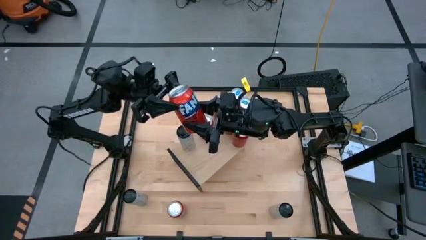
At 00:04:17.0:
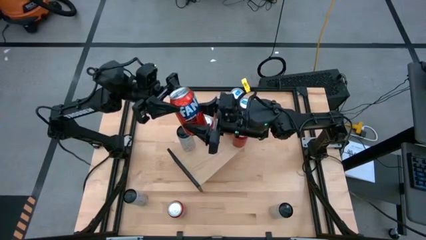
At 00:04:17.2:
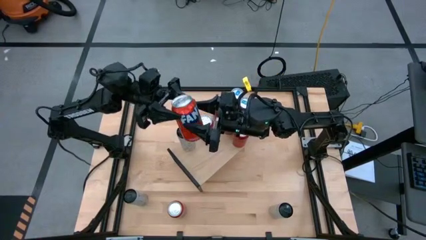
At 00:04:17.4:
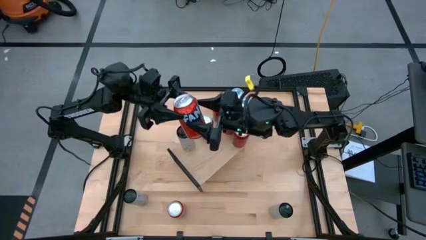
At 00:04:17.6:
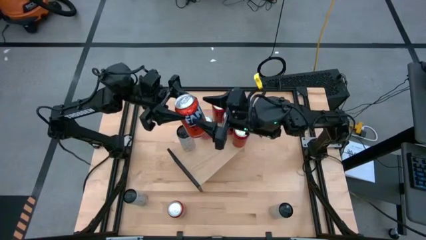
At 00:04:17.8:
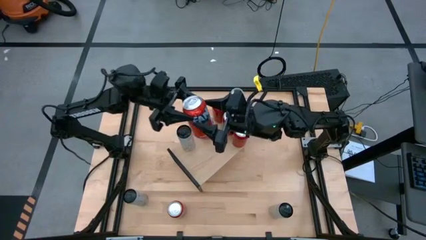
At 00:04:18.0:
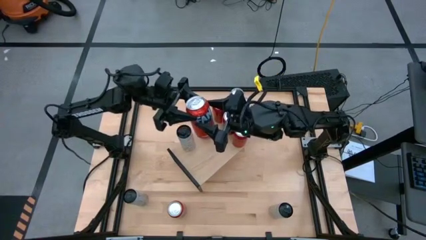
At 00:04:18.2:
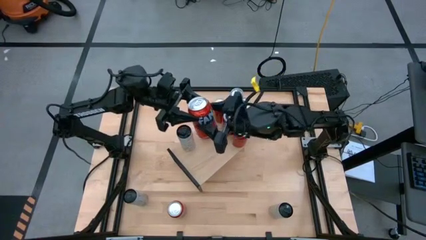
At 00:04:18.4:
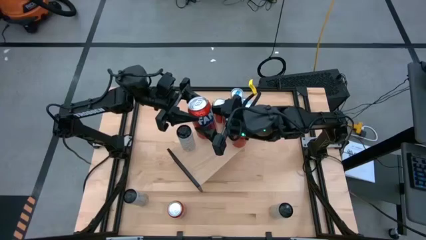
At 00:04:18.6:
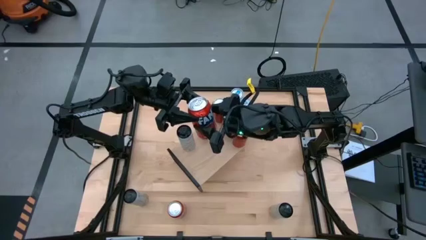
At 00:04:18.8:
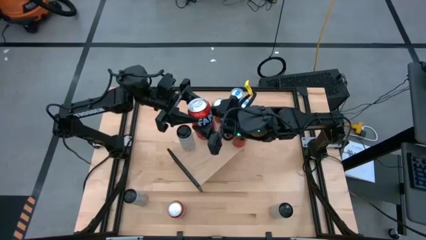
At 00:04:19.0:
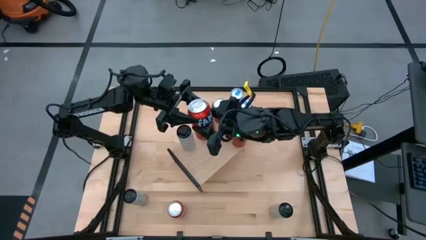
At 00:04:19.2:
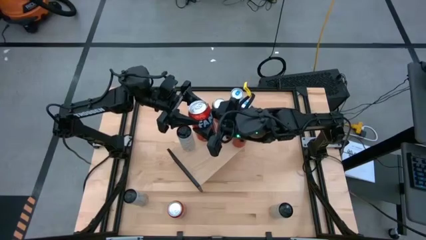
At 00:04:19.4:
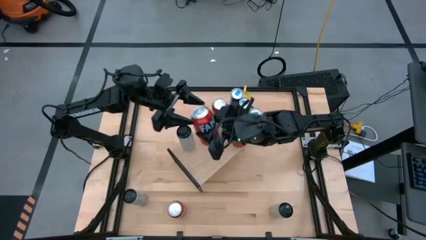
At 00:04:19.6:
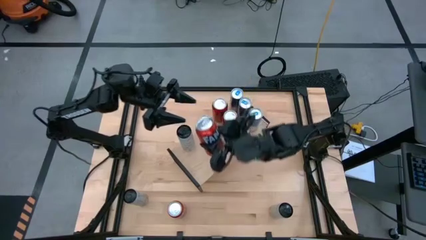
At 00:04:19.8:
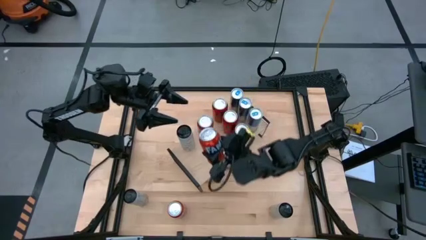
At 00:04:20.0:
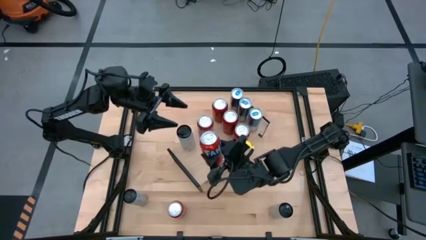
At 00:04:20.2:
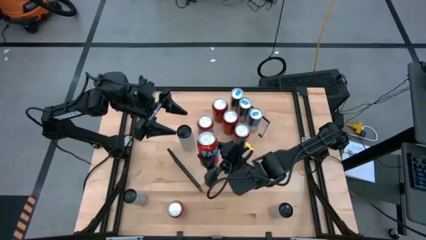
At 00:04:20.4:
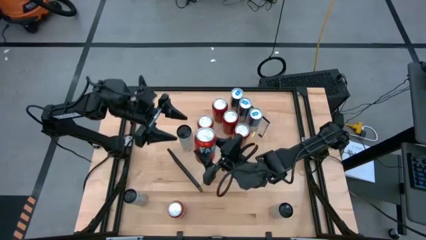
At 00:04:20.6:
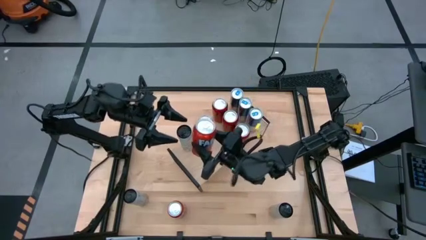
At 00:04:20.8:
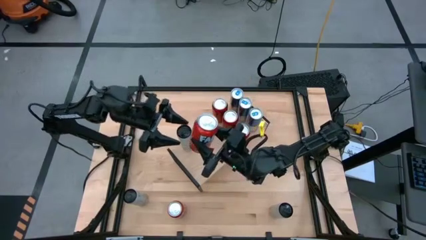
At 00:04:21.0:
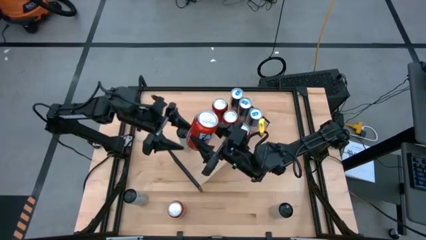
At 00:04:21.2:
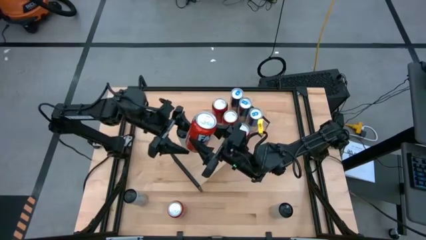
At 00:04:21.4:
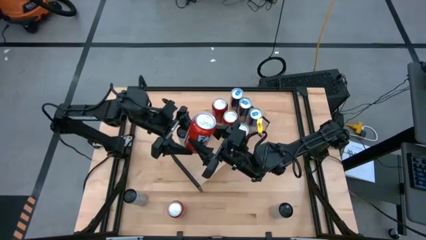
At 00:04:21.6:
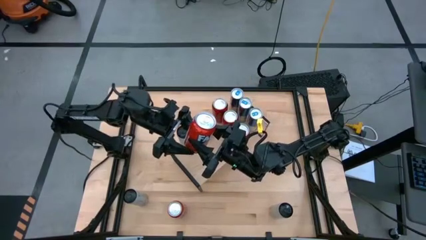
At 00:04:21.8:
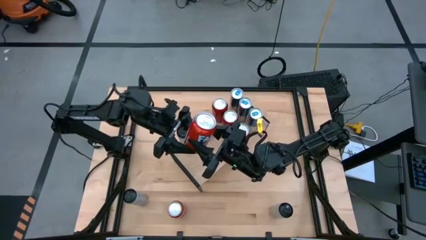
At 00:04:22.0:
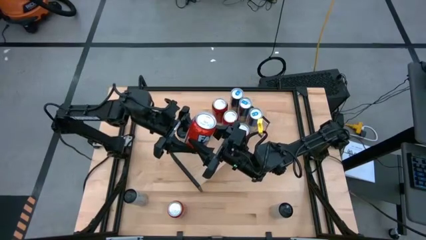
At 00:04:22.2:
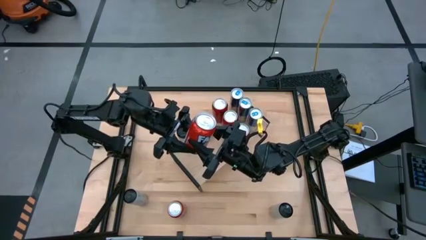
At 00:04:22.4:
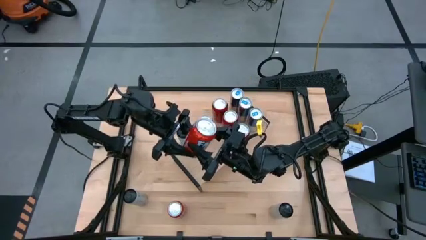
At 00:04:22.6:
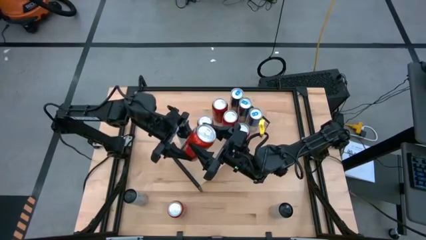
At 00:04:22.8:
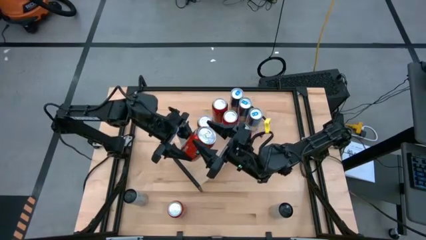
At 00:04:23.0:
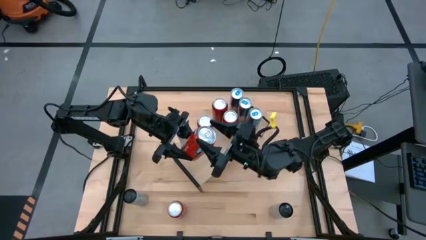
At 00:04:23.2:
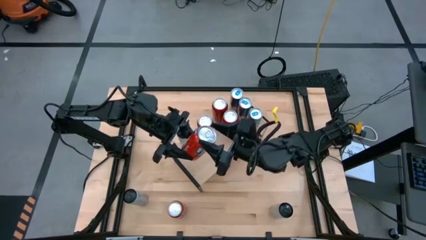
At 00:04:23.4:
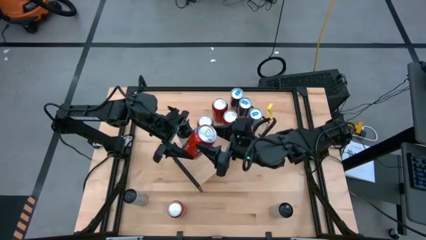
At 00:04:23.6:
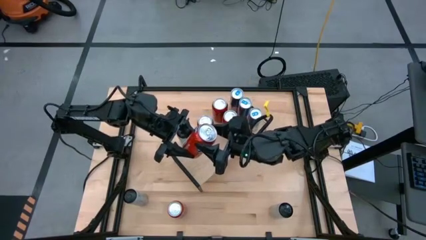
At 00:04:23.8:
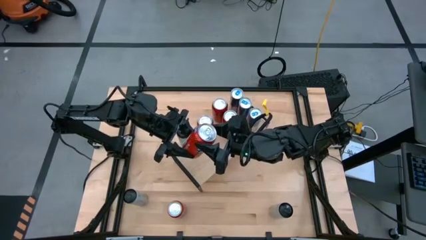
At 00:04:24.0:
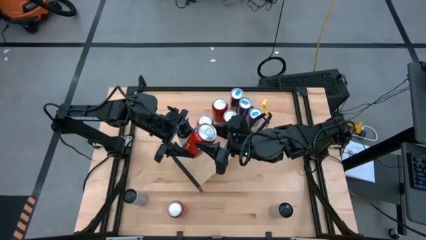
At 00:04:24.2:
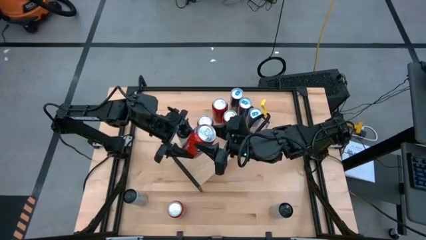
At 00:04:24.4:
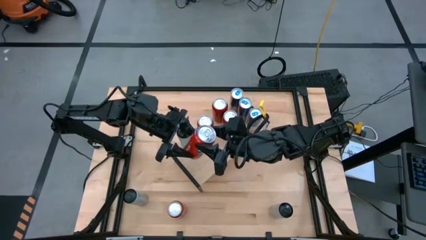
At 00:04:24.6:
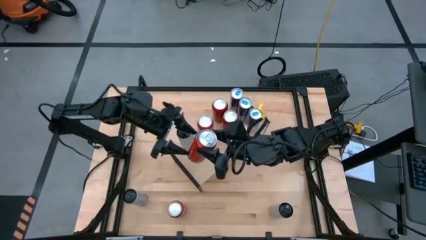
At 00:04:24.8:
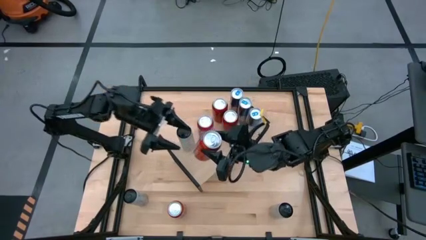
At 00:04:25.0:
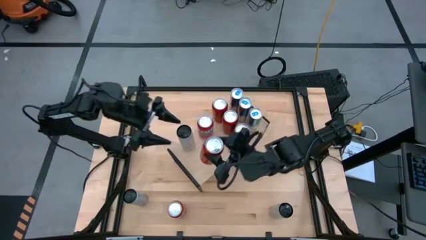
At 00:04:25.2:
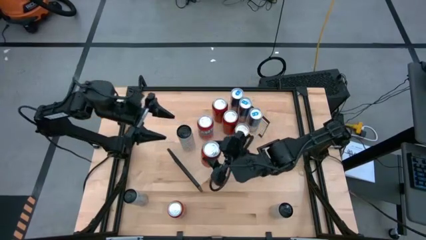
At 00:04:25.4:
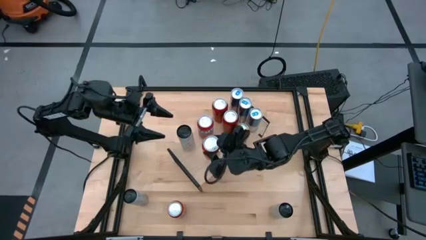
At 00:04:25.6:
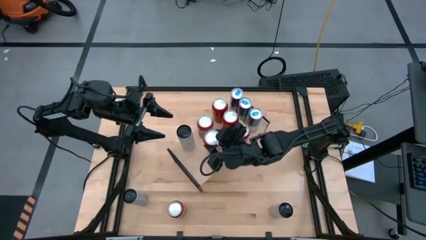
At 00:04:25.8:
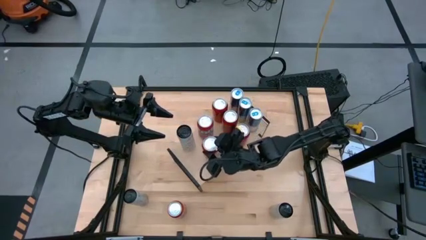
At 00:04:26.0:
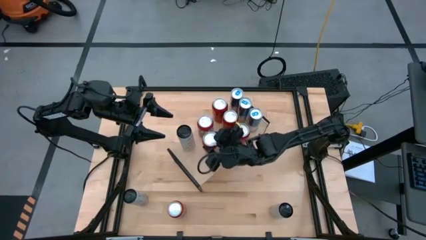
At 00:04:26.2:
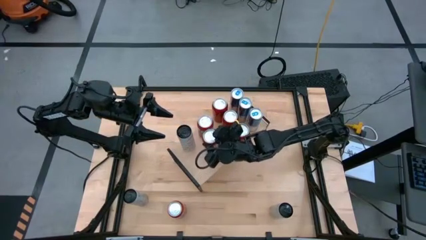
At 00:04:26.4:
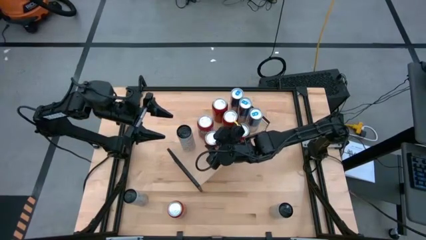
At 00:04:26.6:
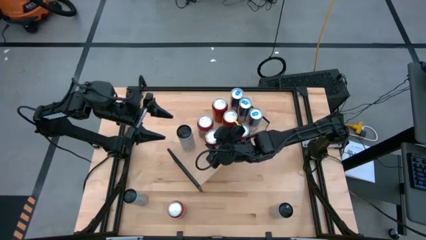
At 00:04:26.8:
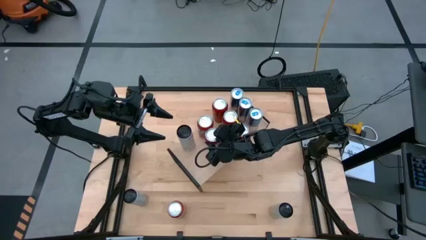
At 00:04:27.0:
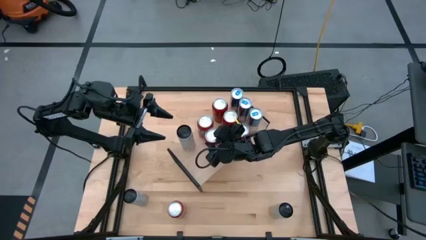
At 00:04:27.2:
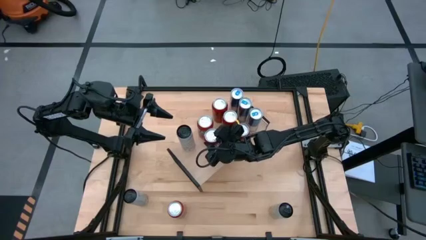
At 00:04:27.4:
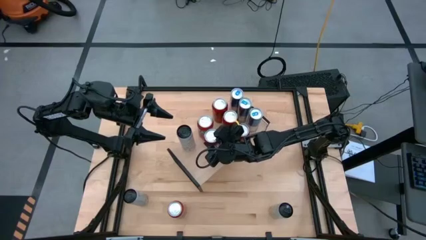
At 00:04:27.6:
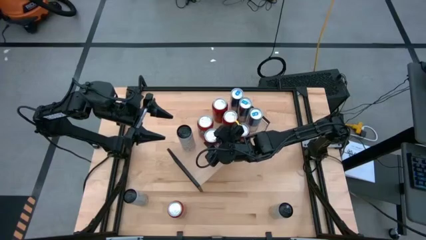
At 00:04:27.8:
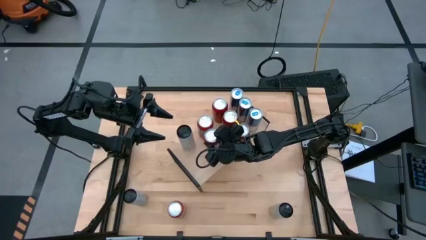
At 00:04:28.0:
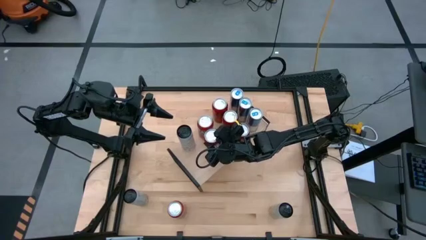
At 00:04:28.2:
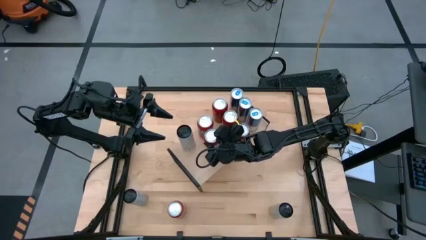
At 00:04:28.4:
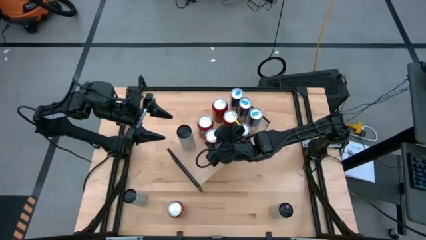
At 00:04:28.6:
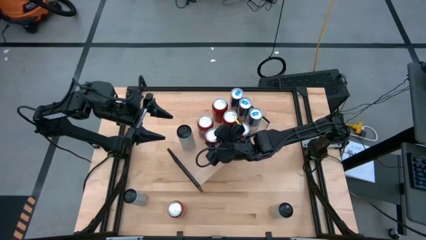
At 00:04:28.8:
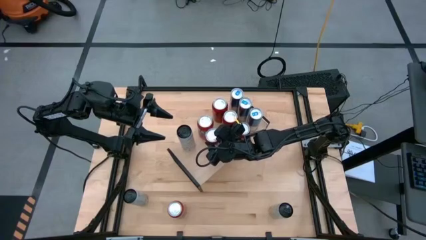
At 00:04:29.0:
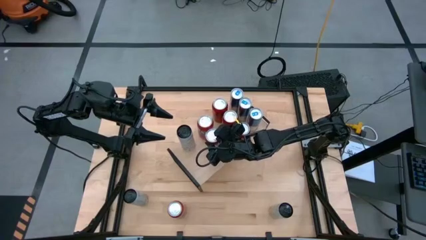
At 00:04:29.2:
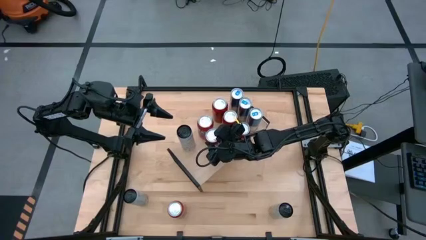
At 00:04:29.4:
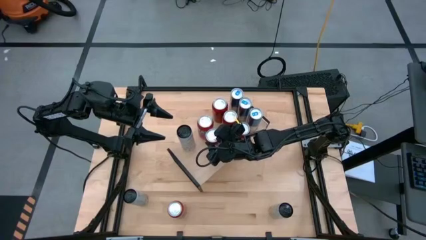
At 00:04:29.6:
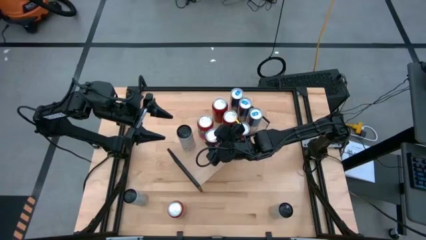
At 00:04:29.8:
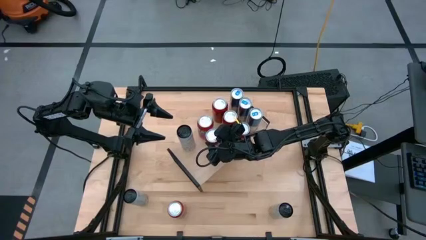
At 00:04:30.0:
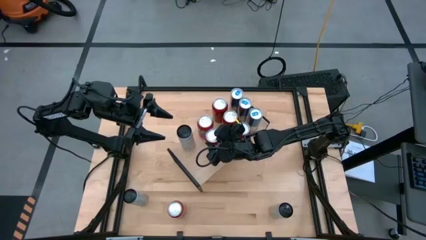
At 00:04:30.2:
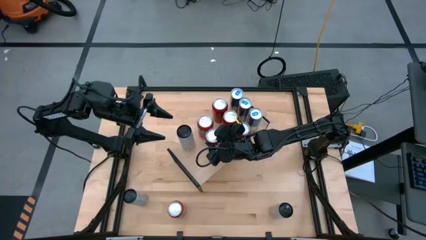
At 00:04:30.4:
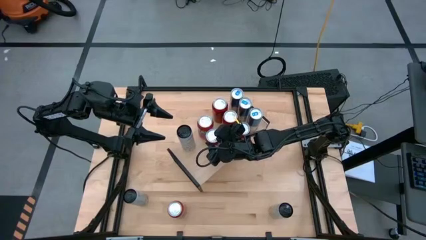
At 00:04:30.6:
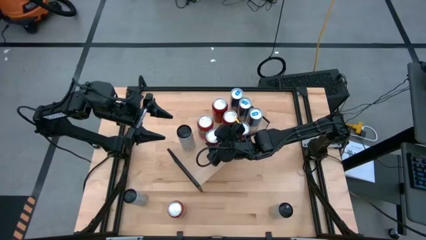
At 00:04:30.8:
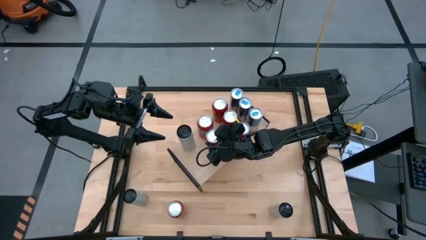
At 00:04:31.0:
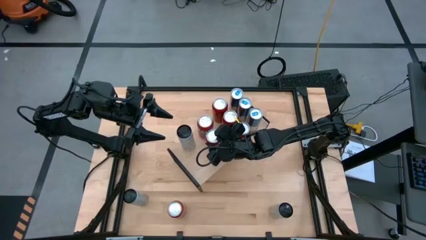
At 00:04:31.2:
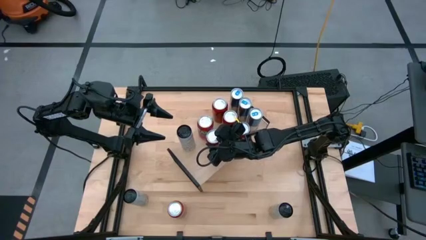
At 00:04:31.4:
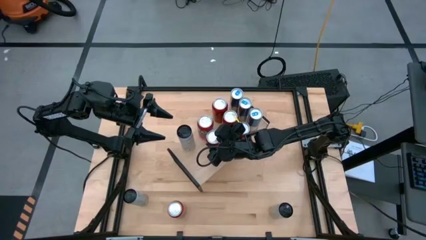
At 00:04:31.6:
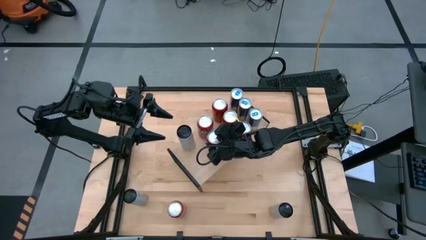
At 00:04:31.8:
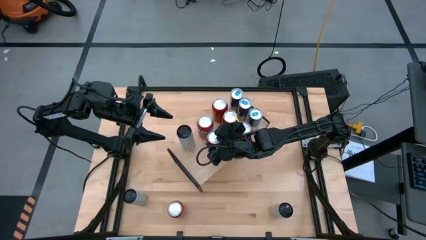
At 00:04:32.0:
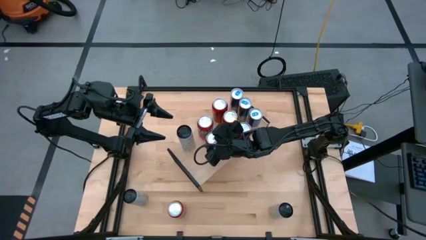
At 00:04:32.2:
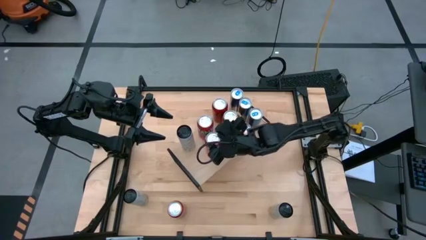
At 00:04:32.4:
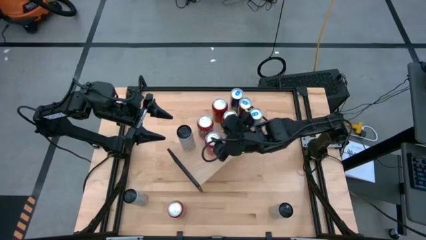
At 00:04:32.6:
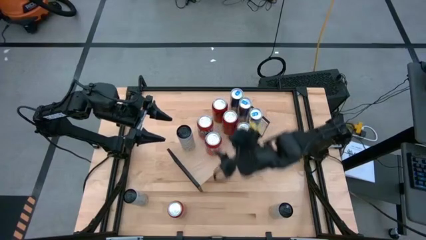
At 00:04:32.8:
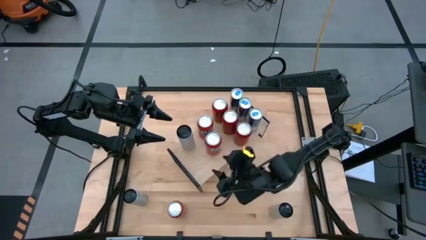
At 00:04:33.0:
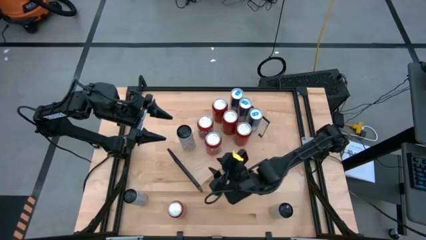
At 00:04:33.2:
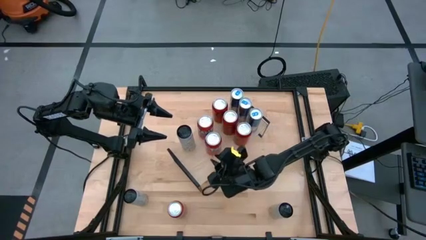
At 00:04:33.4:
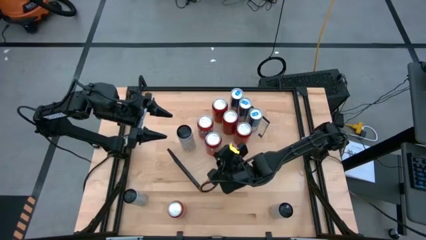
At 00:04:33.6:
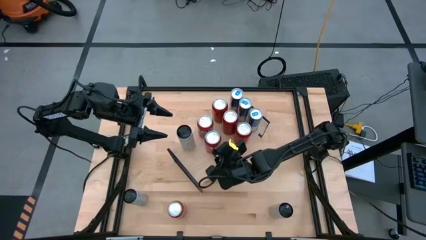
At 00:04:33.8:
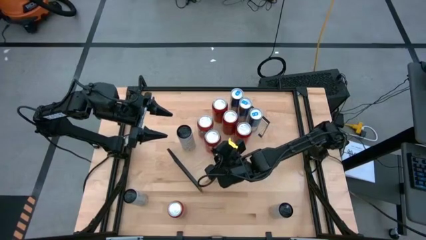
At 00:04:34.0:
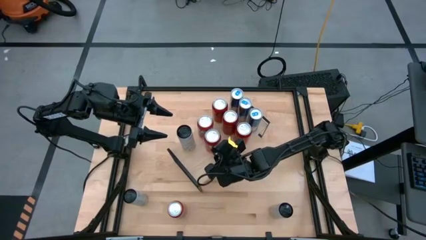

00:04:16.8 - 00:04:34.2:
Task: Place canned beverage on shelf
Put the top orange soda can on the shelf
